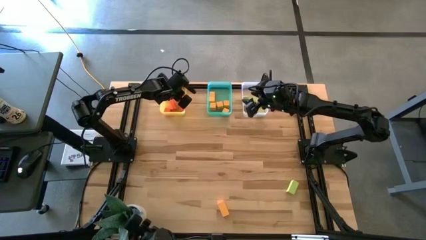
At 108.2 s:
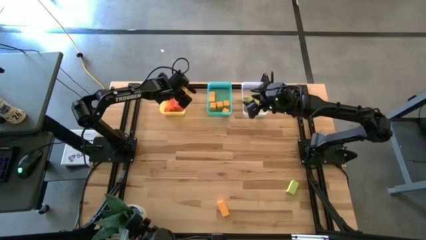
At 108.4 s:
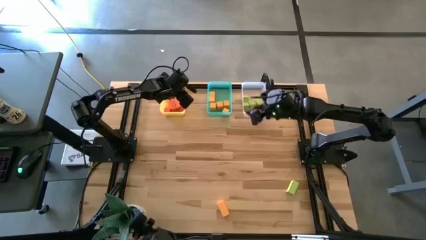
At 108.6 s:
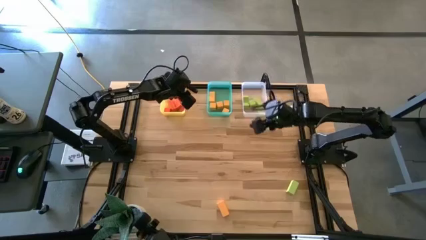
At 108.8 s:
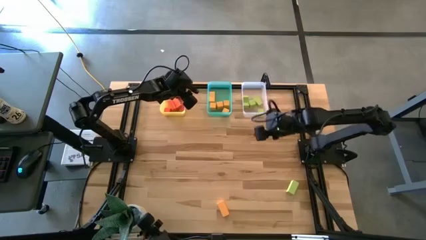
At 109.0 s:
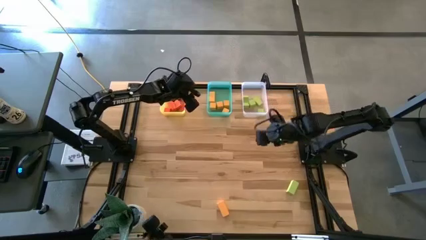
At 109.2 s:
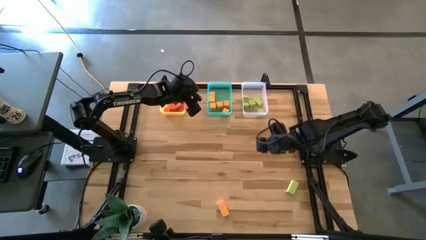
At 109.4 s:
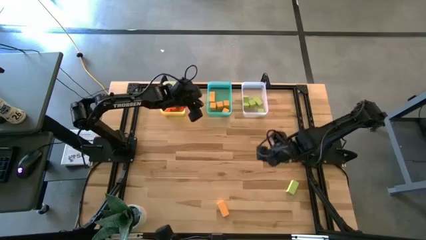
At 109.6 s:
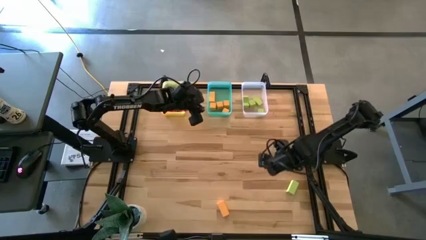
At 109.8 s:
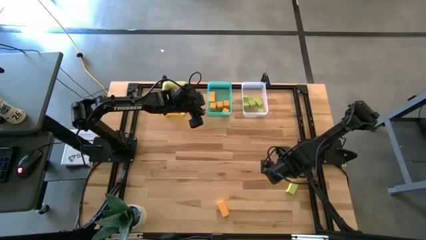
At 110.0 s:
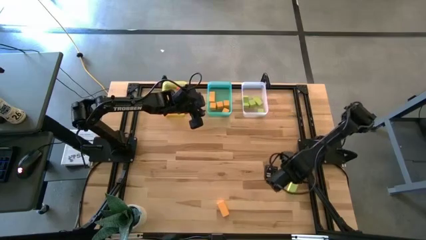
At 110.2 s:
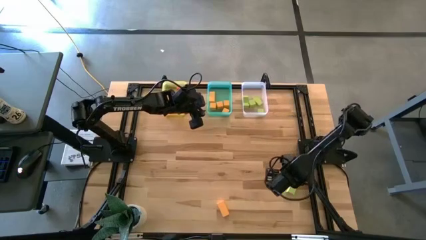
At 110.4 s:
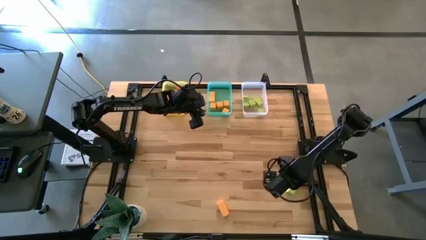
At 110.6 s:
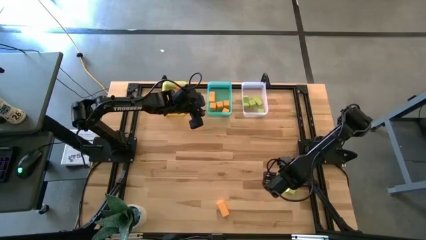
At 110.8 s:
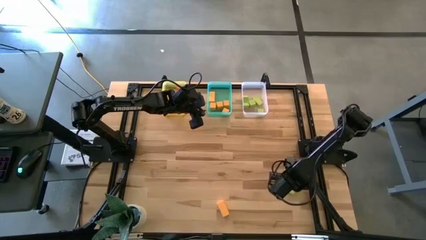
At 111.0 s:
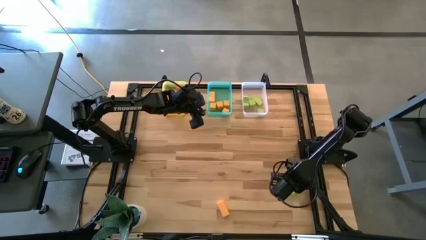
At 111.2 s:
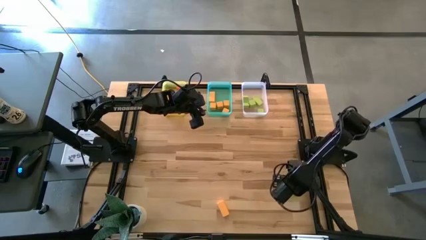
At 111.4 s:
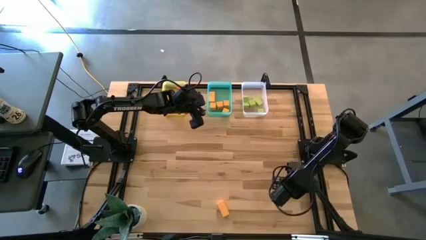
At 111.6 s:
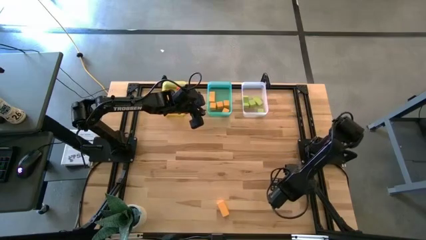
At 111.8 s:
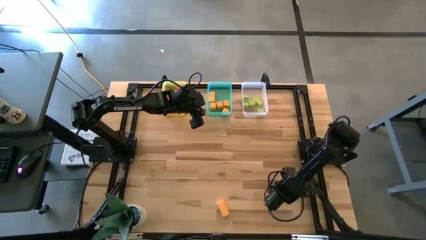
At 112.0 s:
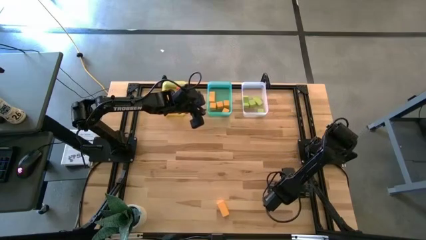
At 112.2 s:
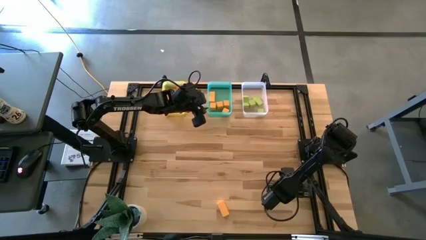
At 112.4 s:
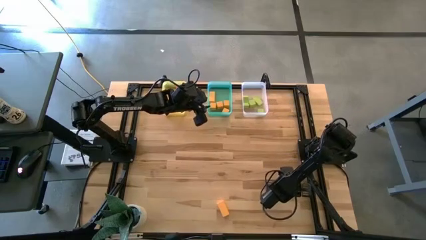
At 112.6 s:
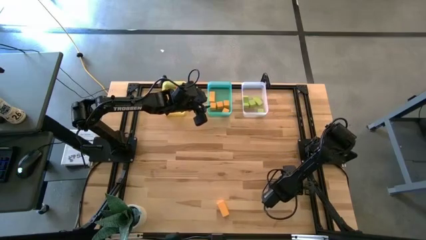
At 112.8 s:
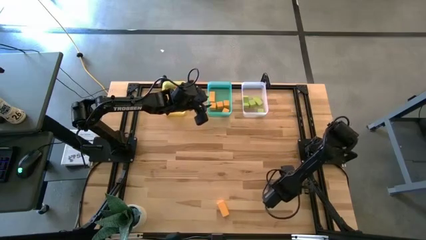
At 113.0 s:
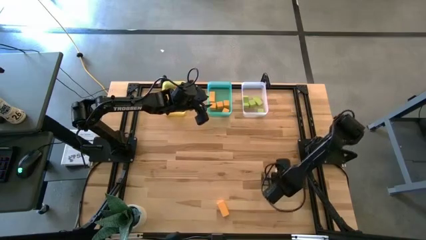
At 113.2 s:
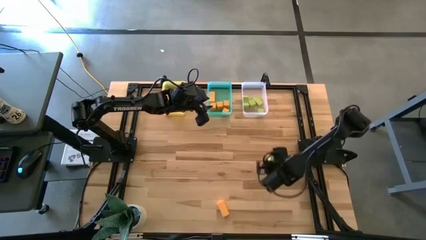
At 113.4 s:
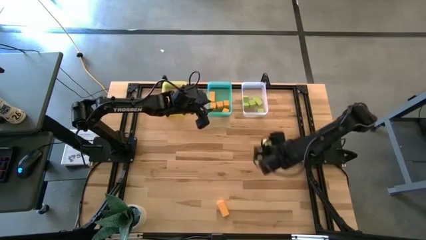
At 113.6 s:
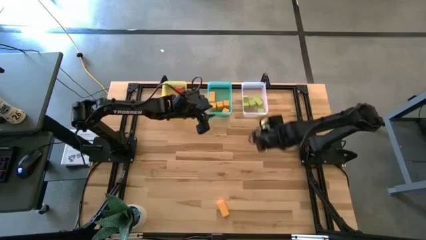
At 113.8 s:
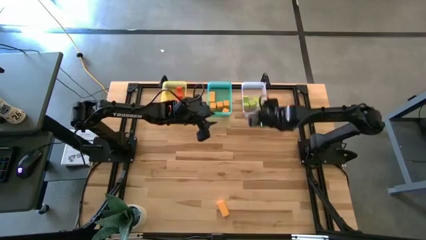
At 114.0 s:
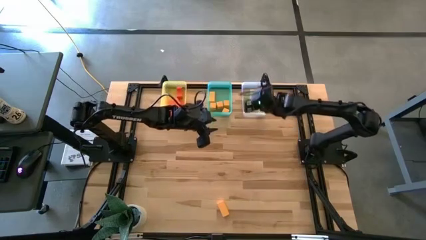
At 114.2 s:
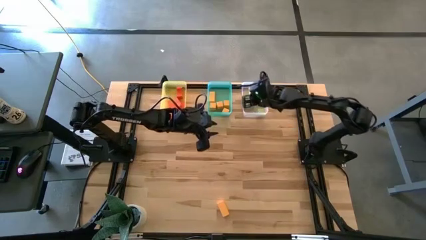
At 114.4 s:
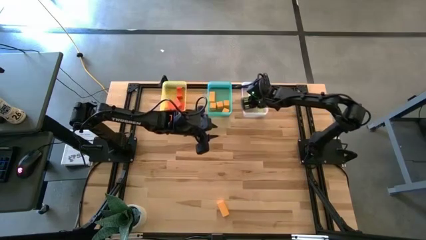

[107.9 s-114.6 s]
Task: Sort & place blocks by color
Put the green block into the transparent bin

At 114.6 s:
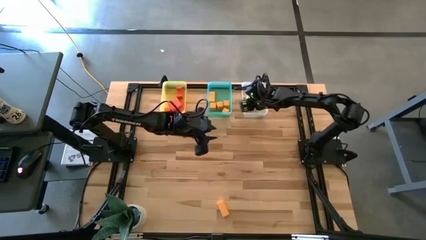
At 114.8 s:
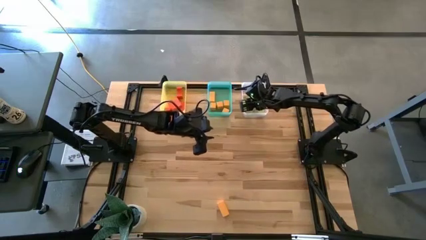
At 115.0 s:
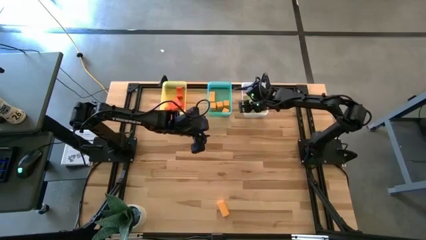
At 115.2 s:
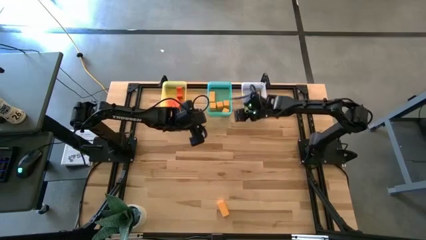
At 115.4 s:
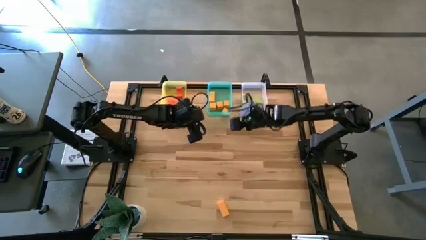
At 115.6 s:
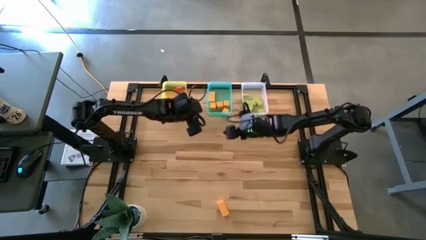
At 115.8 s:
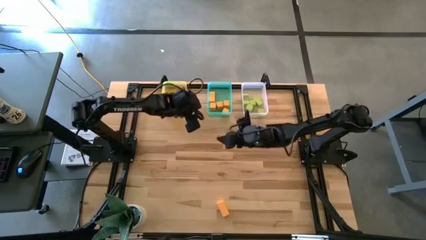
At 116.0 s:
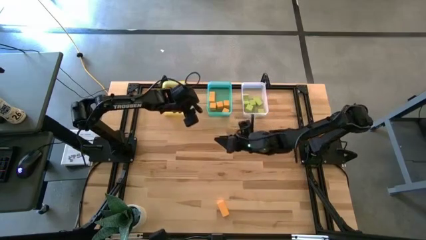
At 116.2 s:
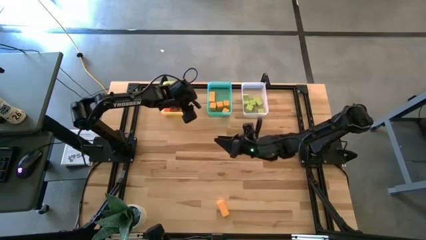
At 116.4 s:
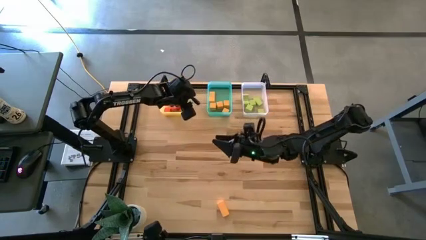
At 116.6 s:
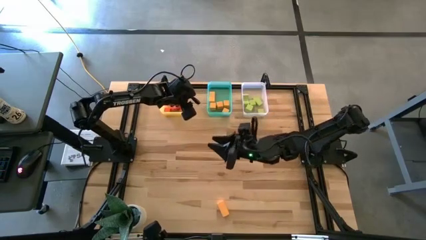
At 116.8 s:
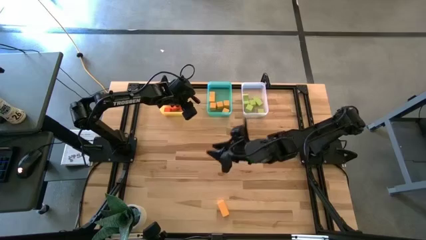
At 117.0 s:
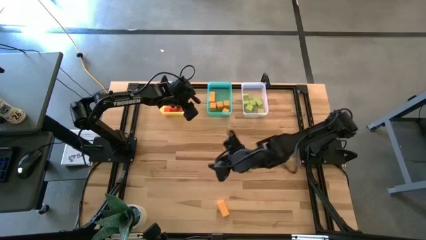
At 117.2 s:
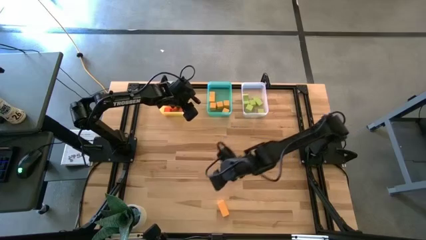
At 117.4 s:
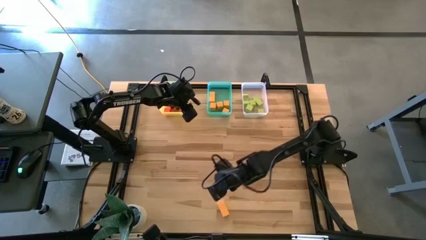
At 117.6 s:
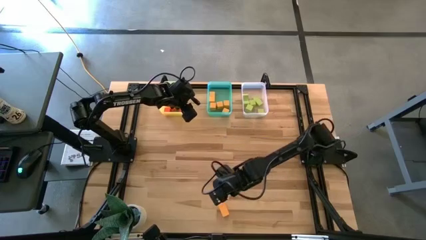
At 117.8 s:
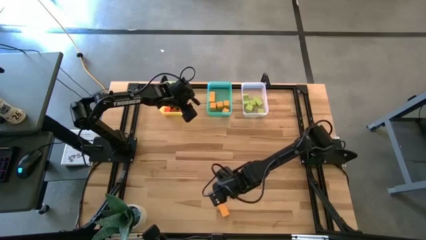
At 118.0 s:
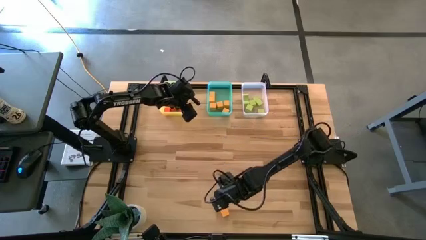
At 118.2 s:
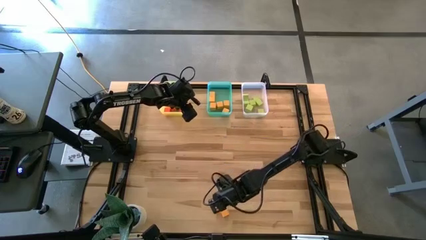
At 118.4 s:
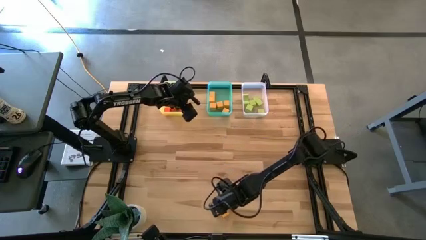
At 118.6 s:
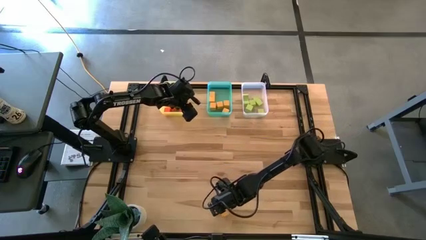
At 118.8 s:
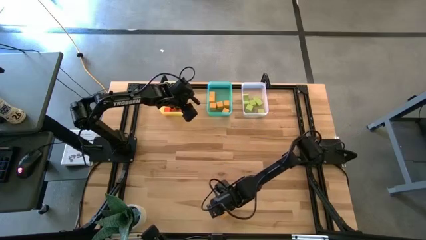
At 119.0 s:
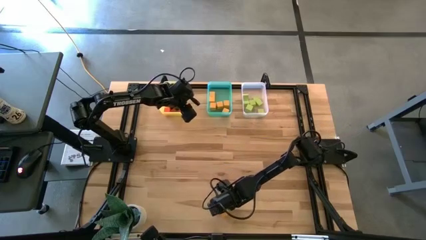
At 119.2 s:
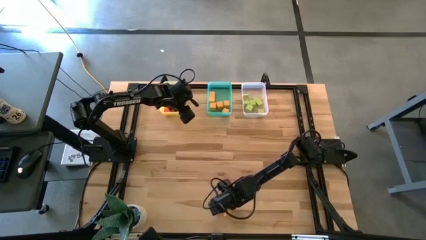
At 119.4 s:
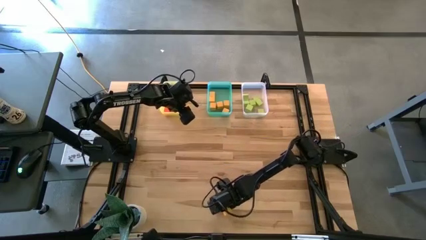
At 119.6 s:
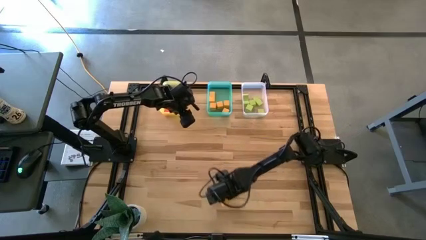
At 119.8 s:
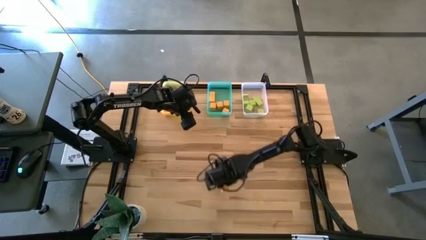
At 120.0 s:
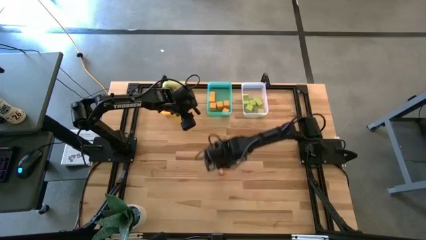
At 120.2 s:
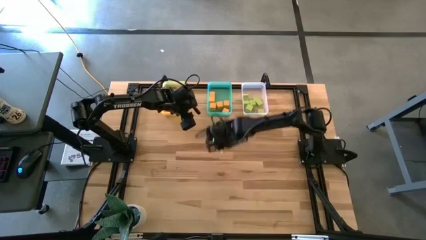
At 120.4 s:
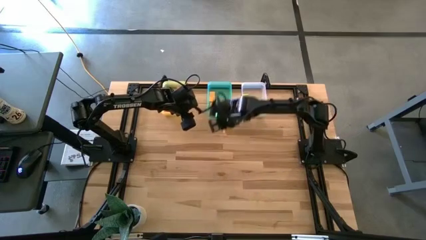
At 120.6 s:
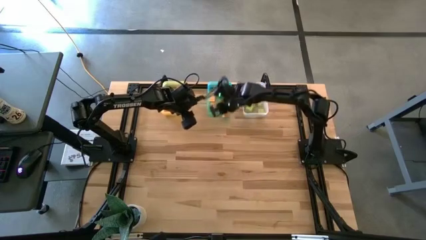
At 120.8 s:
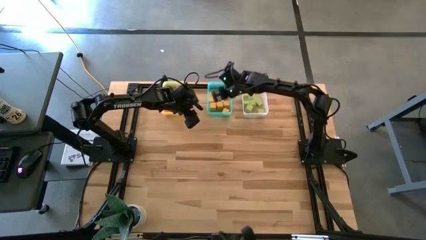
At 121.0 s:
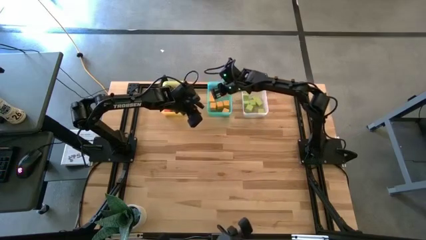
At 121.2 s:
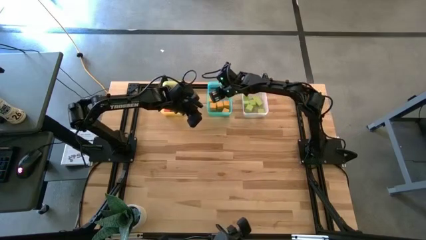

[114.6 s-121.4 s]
Put the yellow block into the green bin
